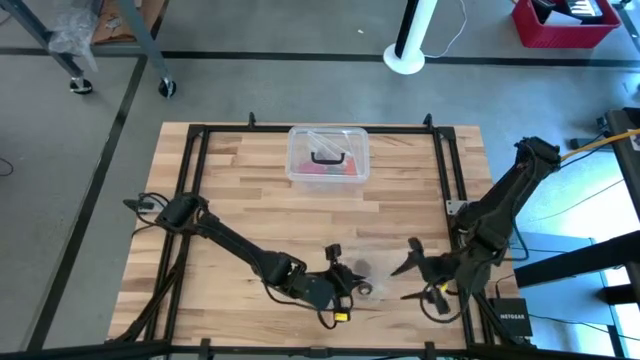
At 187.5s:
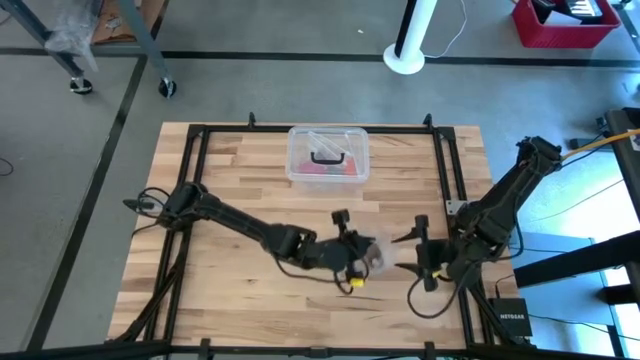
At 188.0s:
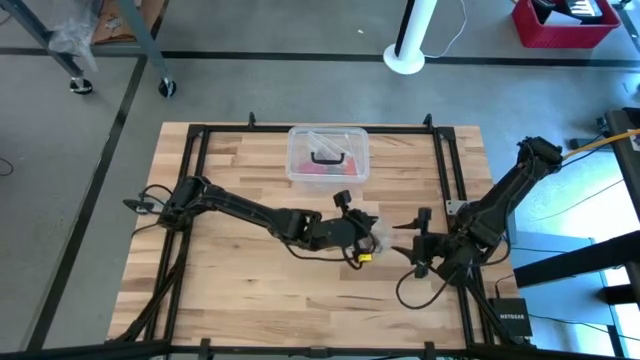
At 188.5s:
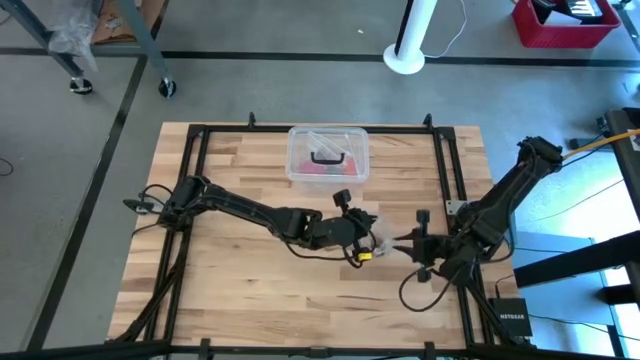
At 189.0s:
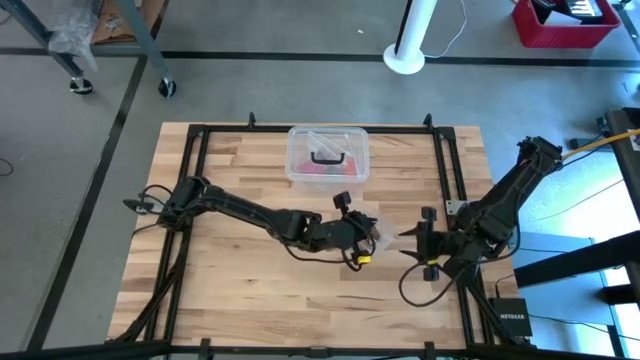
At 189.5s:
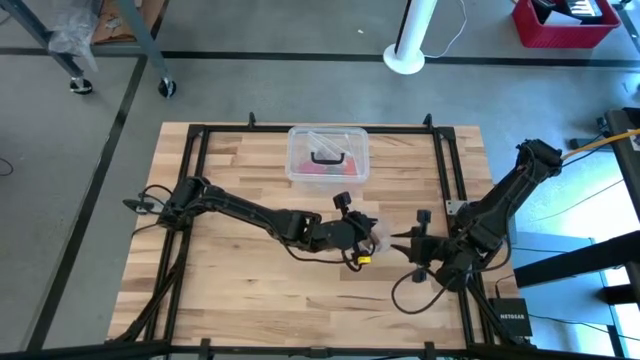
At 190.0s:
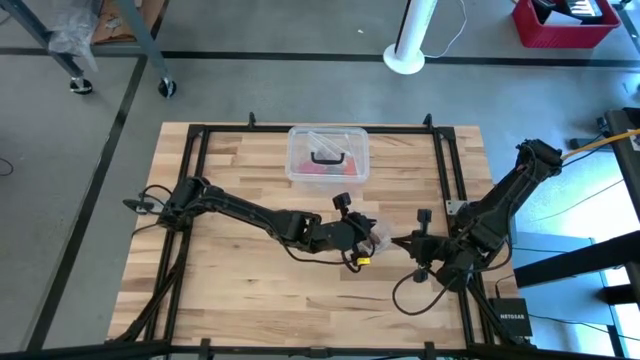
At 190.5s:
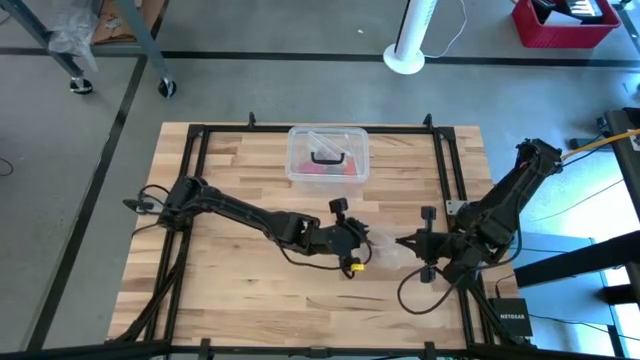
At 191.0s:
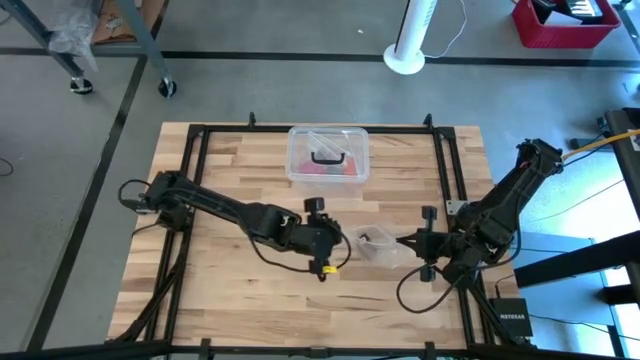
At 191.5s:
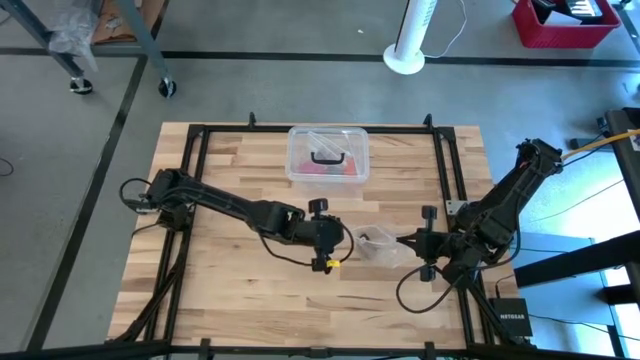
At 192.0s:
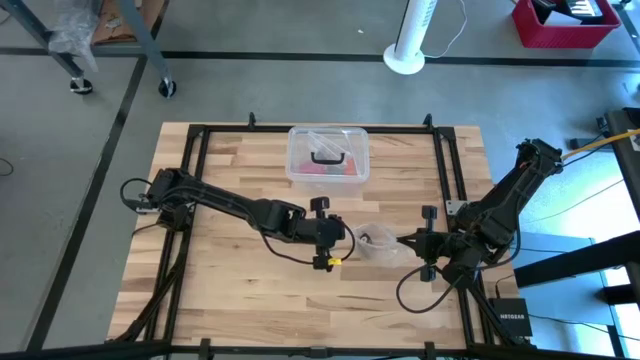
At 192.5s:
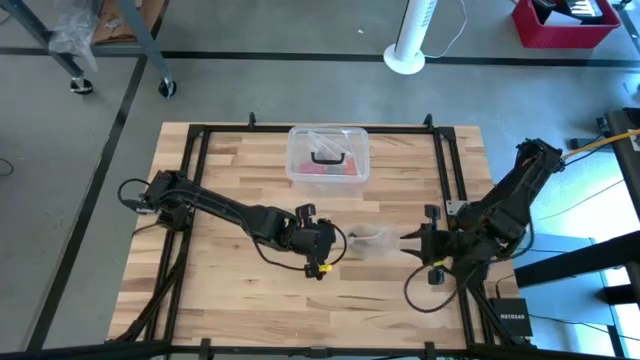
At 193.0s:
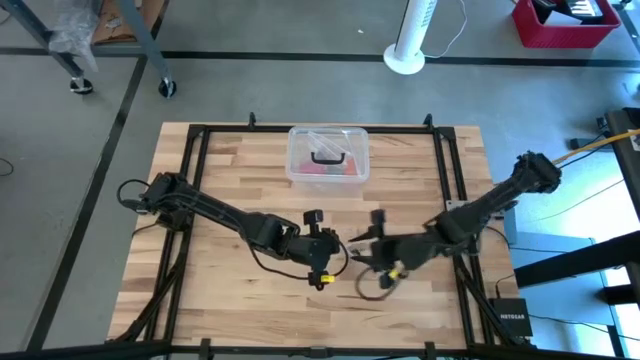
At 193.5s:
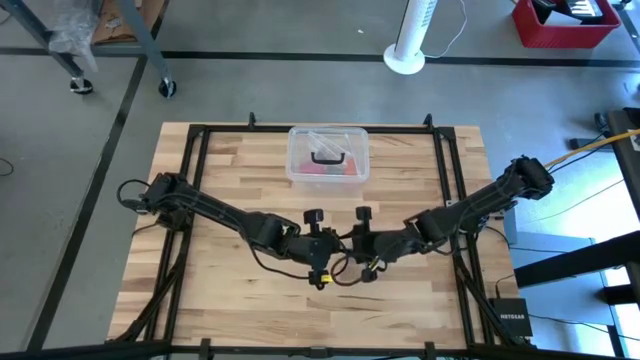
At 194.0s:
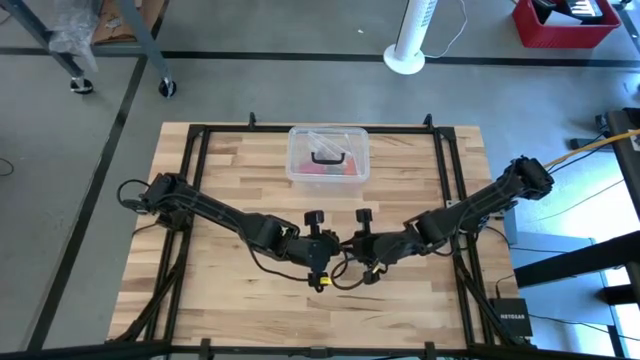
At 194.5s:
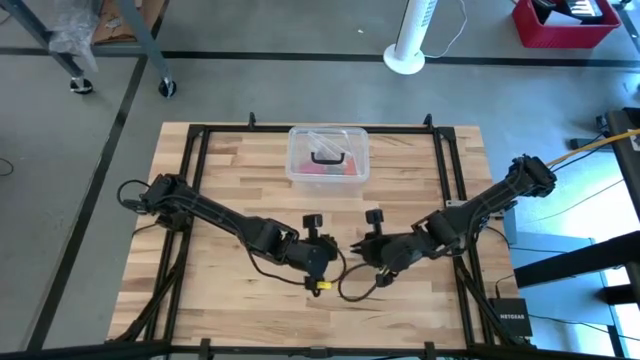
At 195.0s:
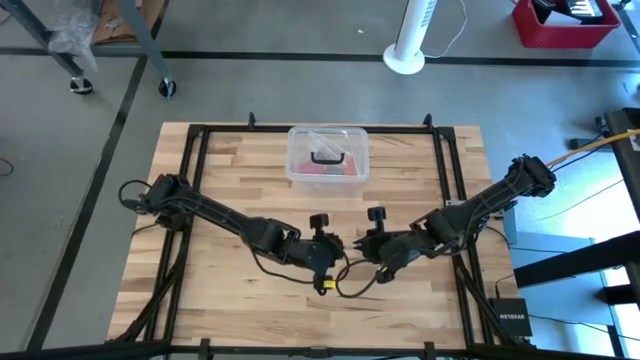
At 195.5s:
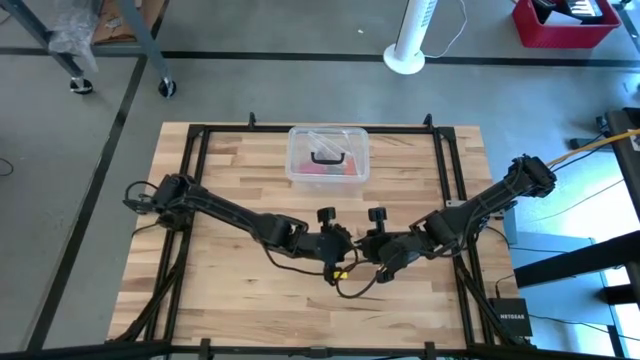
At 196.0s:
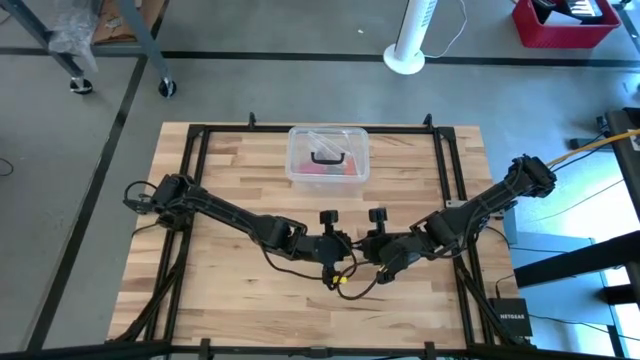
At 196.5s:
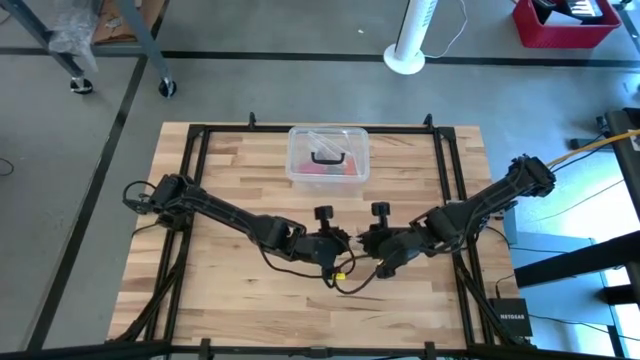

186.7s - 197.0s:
Task: Roll bandage
Close the transparent zip bag

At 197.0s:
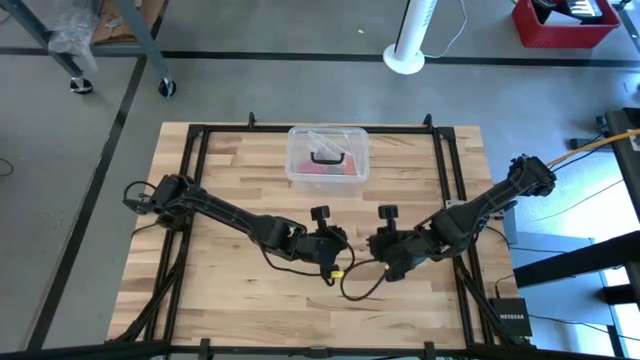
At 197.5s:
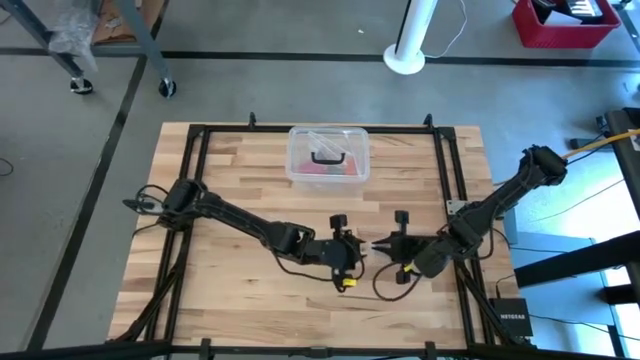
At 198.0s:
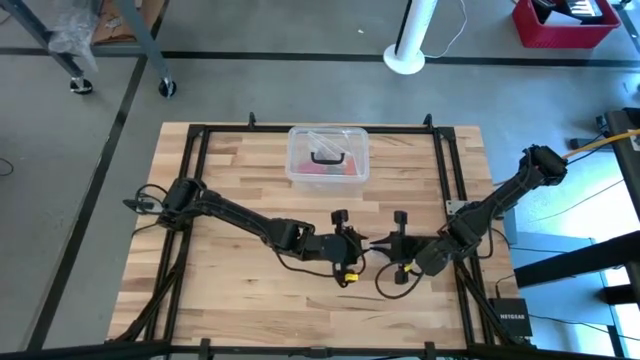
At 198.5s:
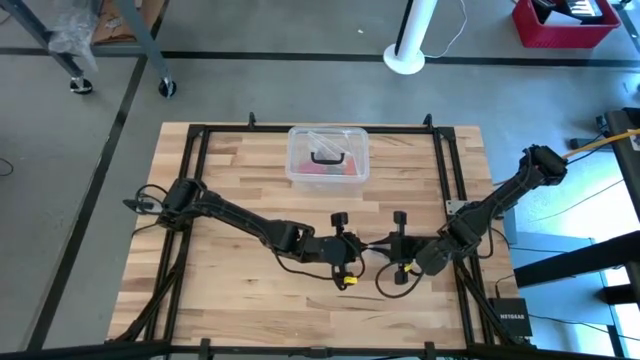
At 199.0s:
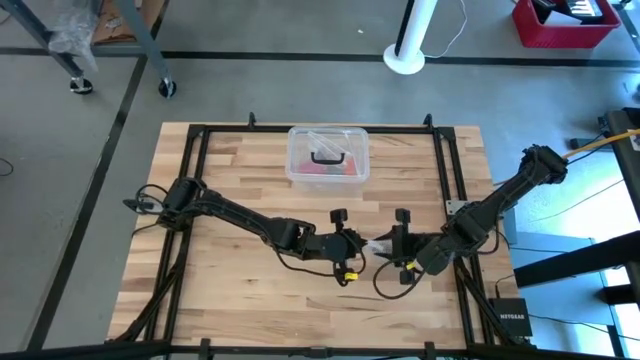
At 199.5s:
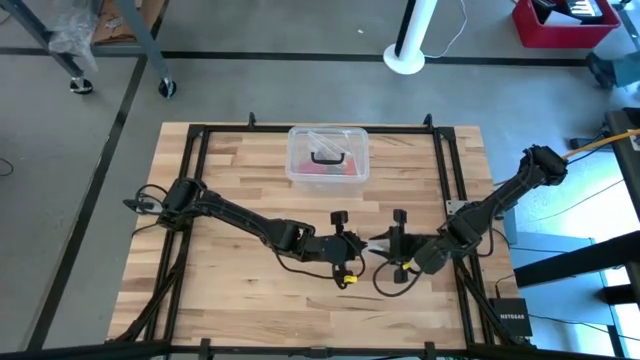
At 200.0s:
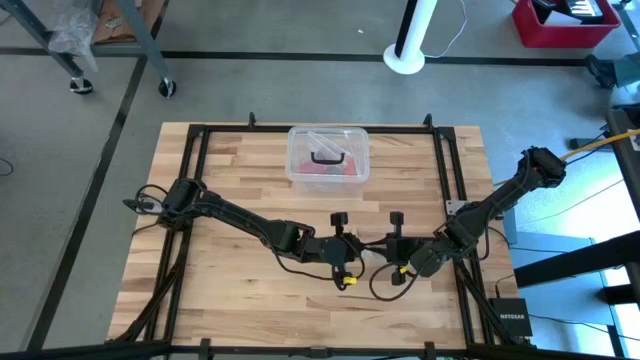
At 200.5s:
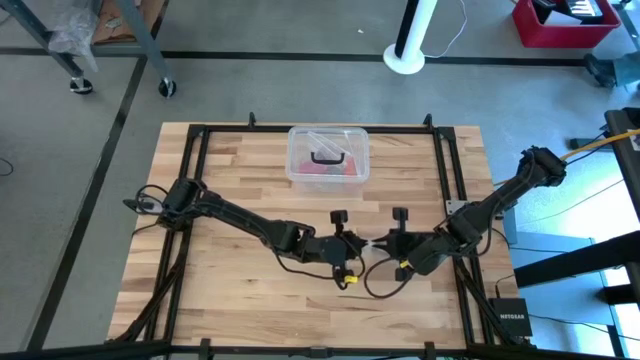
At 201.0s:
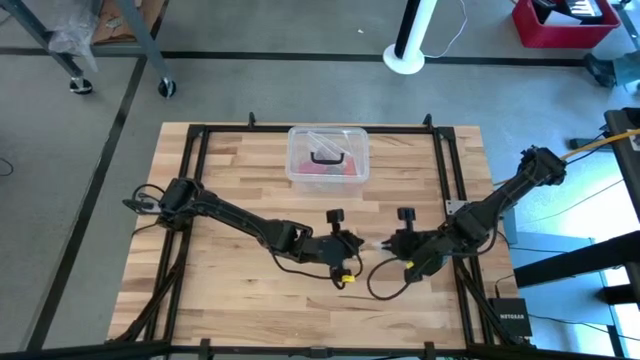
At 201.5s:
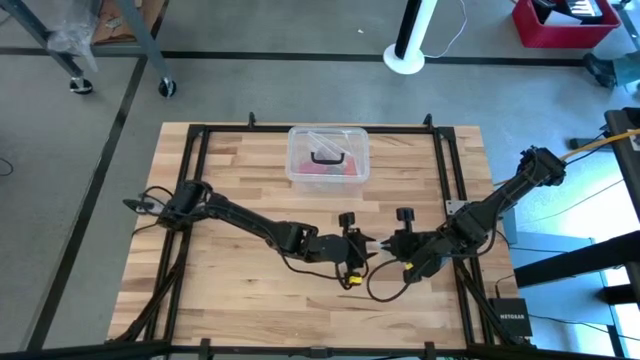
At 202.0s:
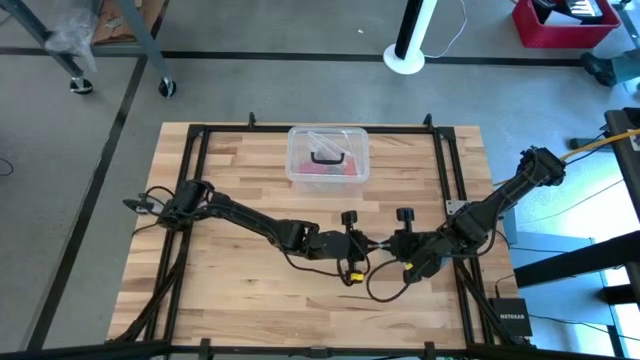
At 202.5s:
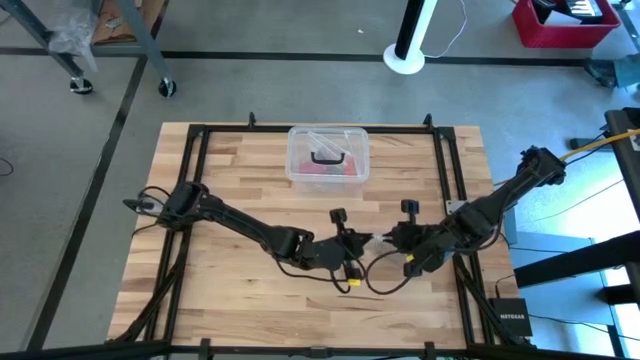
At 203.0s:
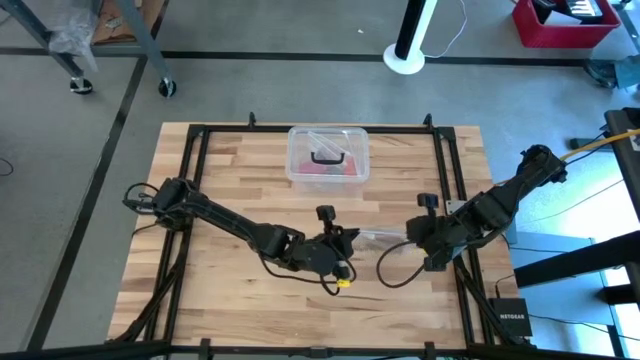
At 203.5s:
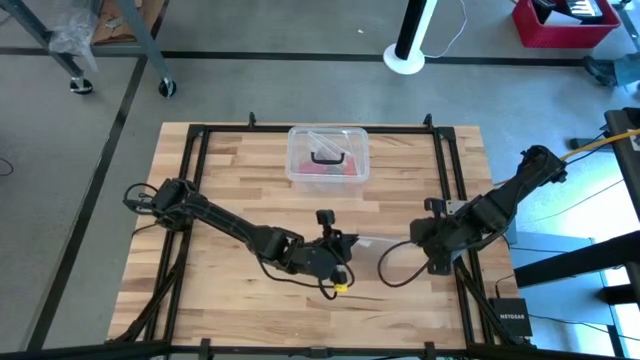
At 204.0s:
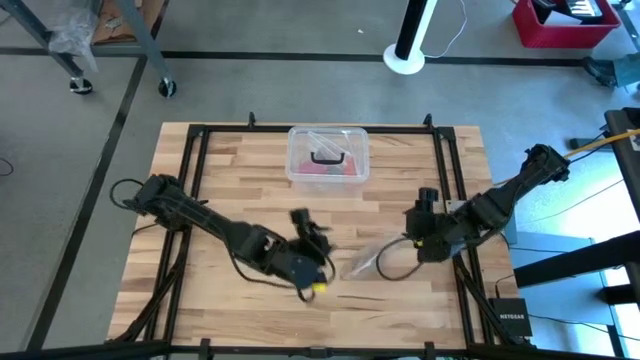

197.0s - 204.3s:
Close the transparent zip bag

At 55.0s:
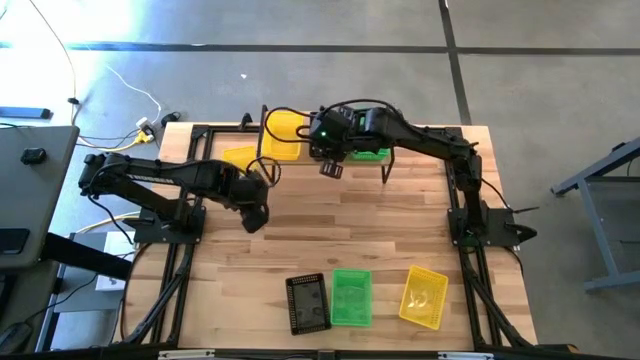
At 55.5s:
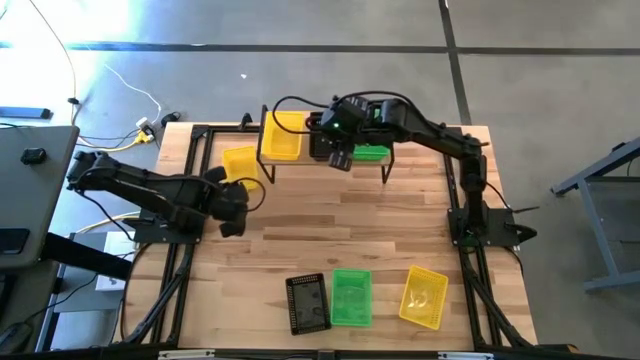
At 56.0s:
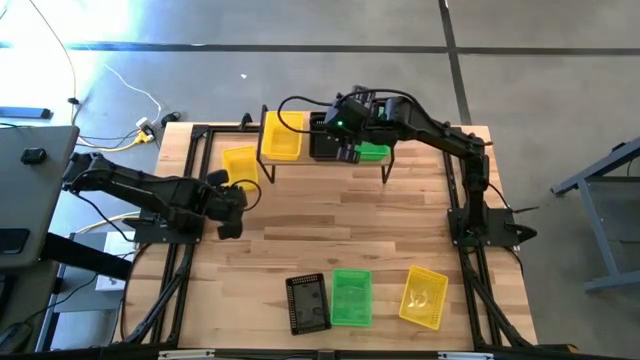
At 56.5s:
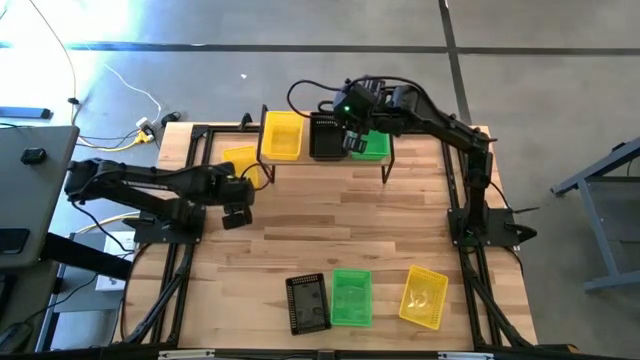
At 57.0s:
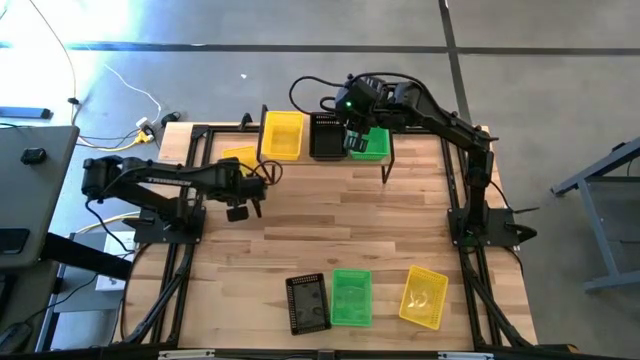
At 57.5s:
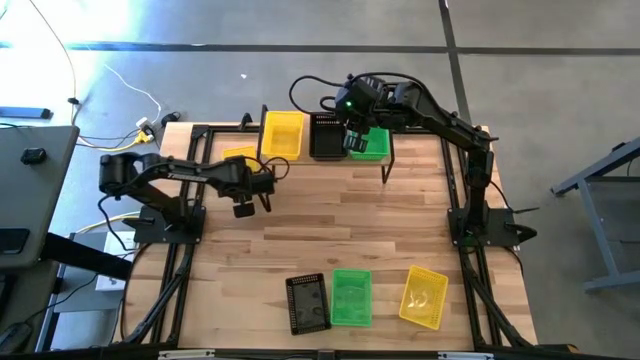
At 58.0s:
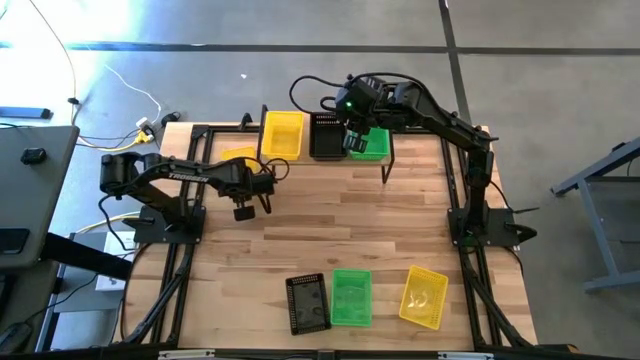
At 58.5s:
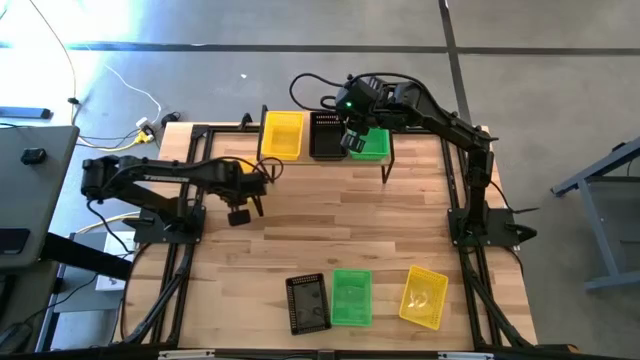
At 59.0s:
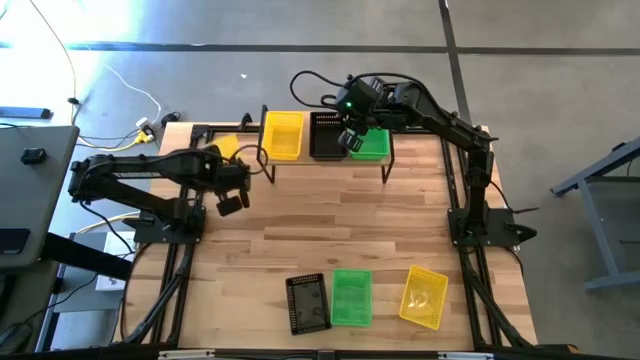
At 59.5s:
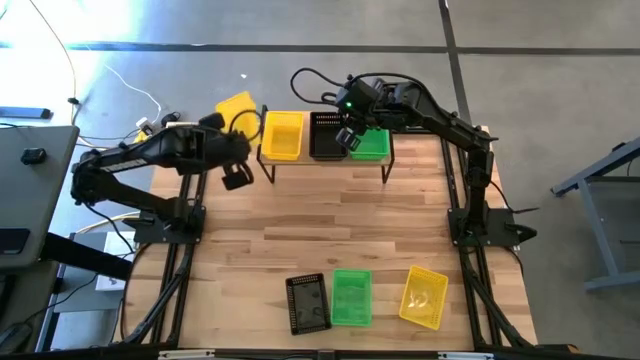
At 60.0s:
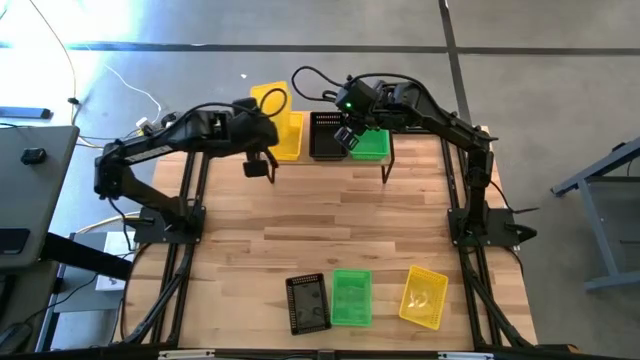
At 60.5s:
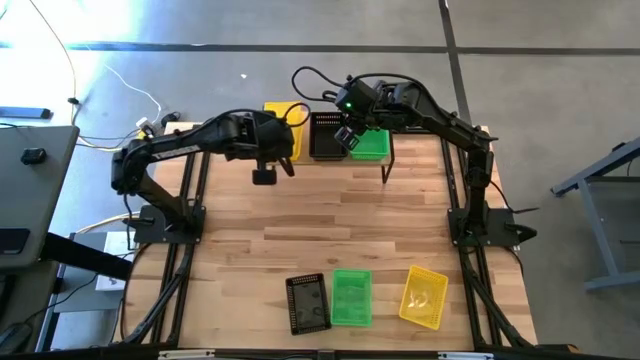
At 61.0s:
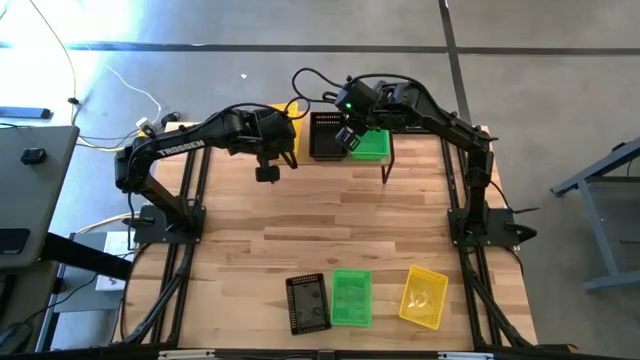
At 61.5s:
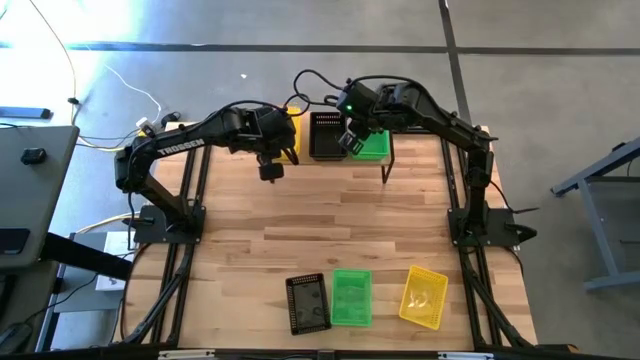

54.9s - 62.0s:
Task: Stack baskets on shelf by color
Stack the top left yellow bin on the other yellow bin on the shelf
